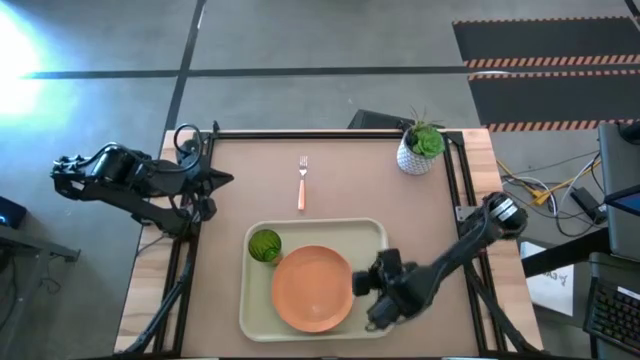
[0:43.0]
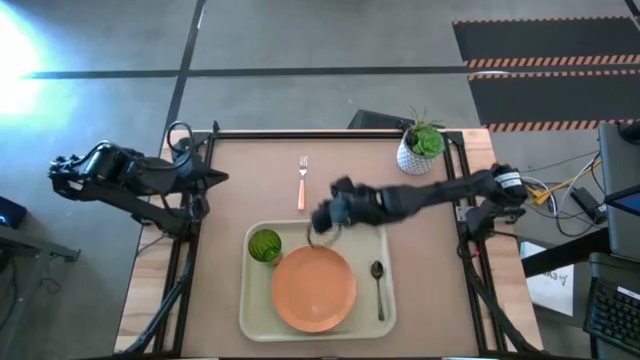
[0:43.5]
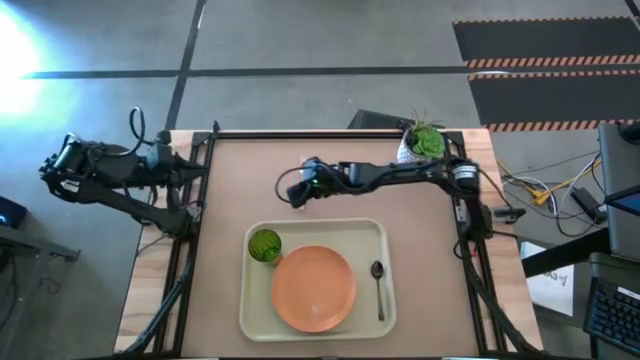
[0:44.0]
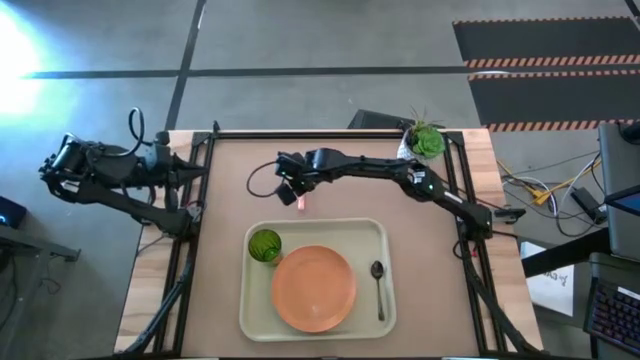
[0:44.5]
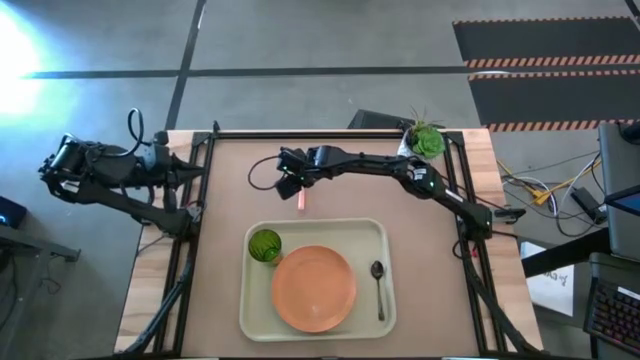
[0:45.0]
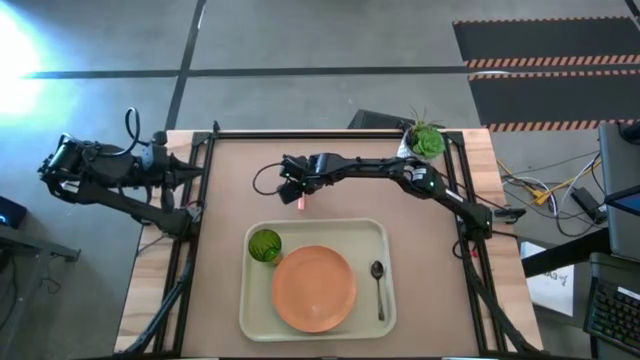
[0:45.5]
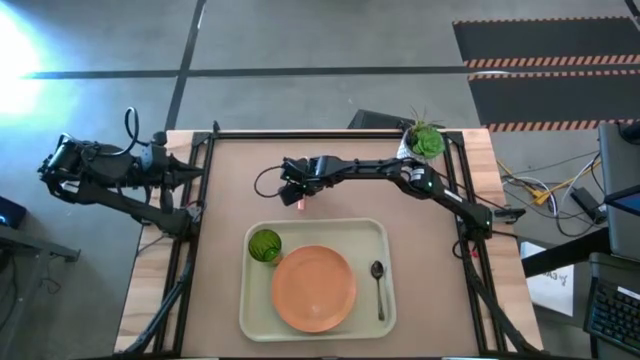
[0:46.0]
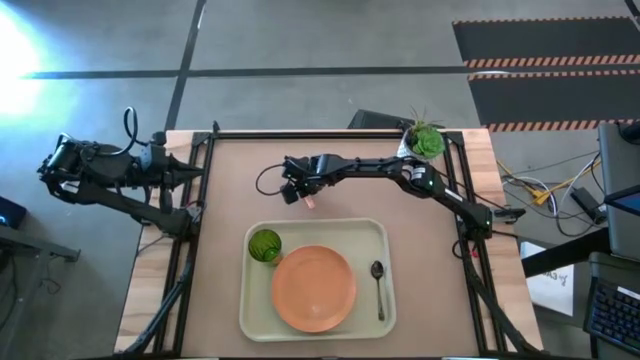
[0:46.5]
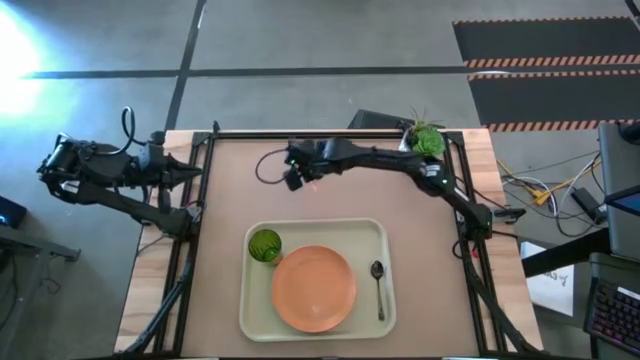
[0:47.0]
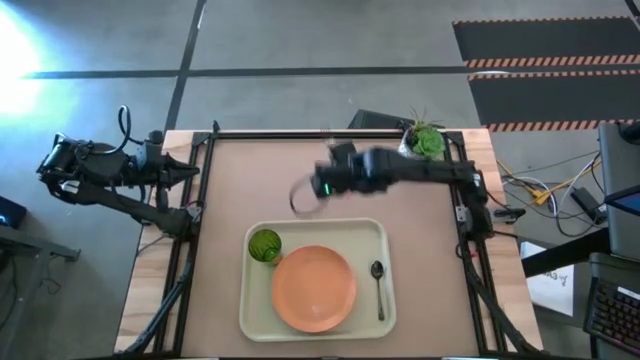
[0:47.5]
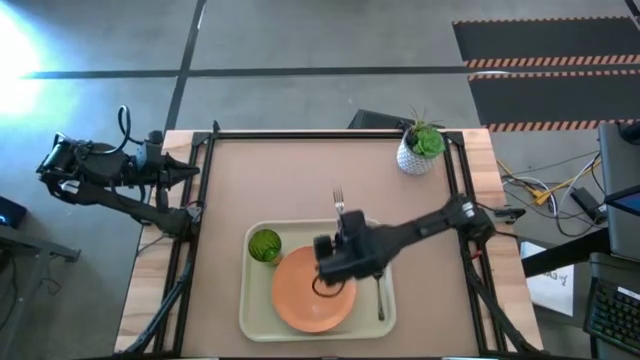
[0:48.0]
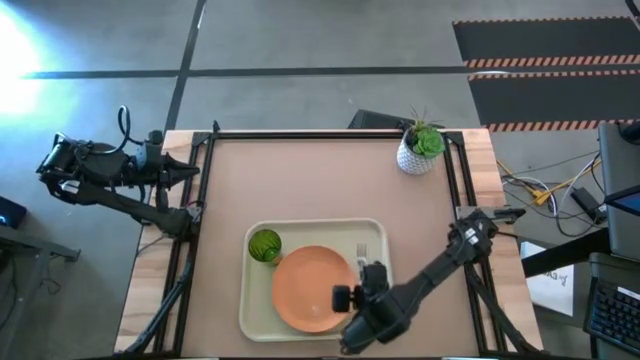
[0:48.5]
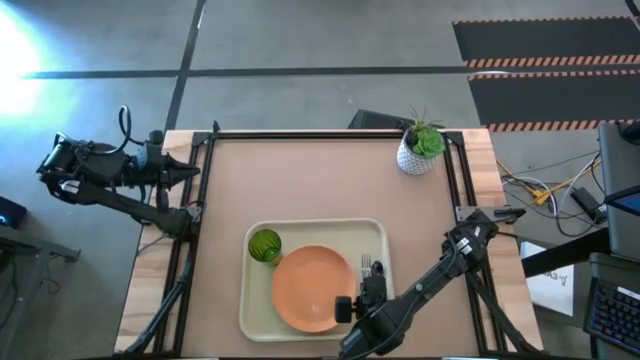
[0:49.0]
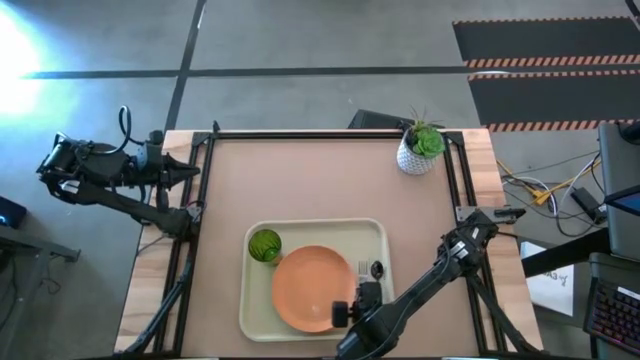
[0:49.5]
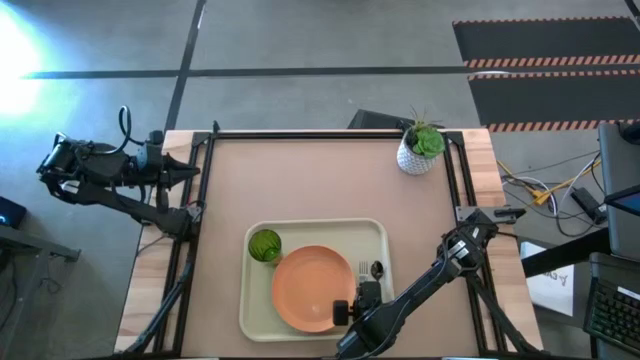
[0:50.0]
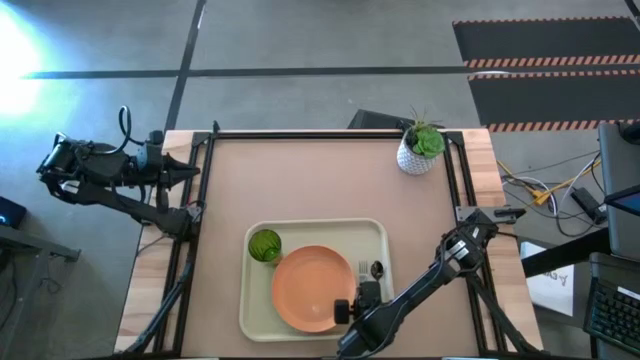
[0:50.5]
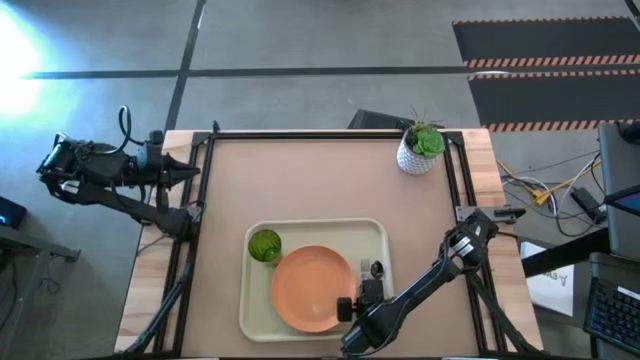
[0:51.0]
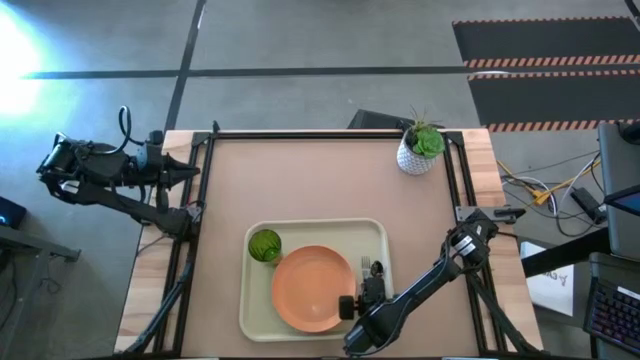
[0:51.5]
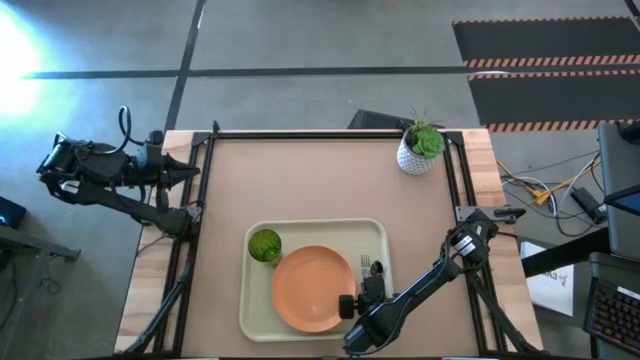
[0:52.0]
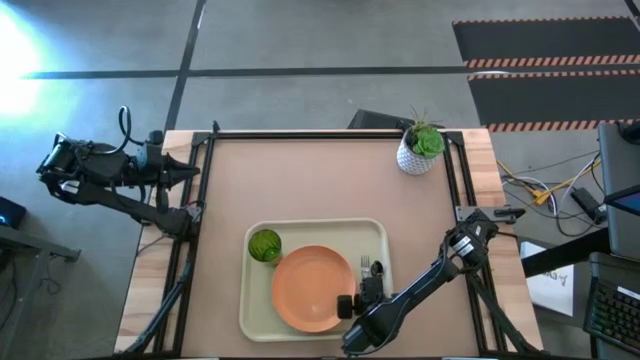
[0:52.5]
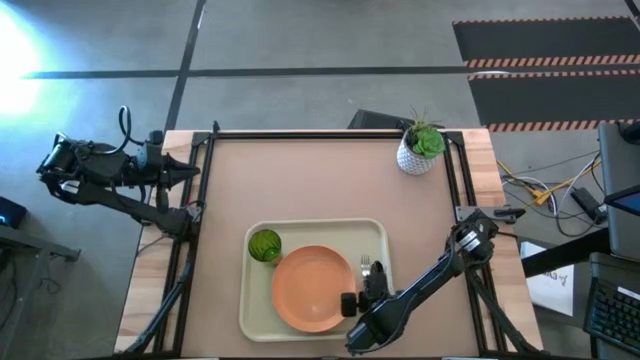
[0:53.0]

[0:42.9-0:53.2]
Task: Pick and place plate/cup/fork/spoon on tray
Put the light orange fork on the left side of the black spoon

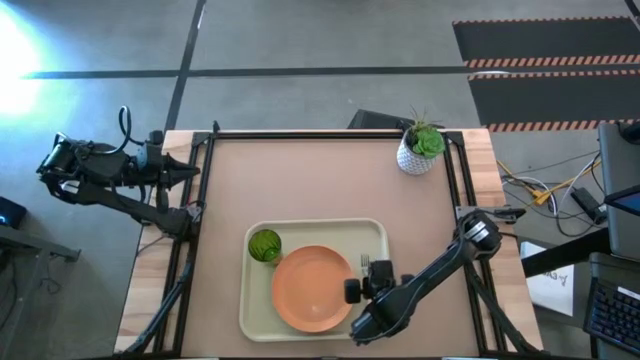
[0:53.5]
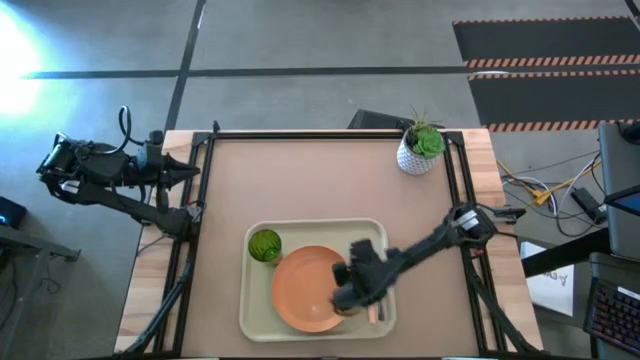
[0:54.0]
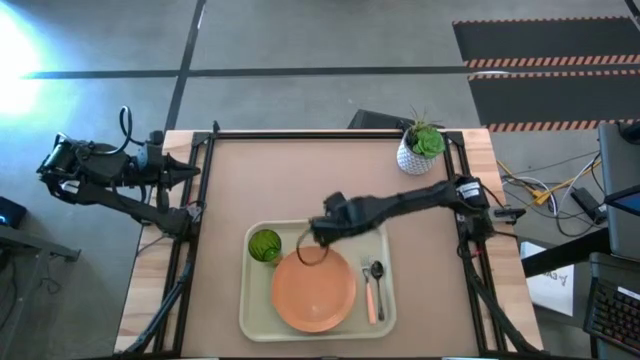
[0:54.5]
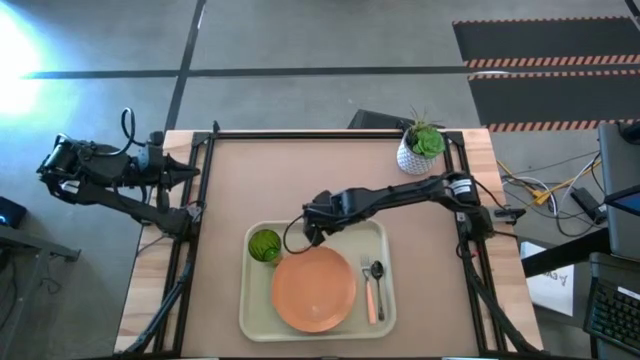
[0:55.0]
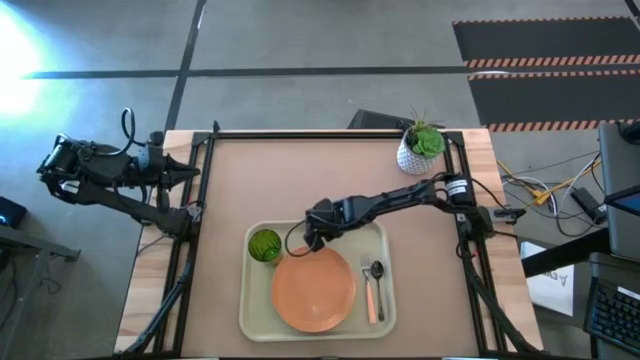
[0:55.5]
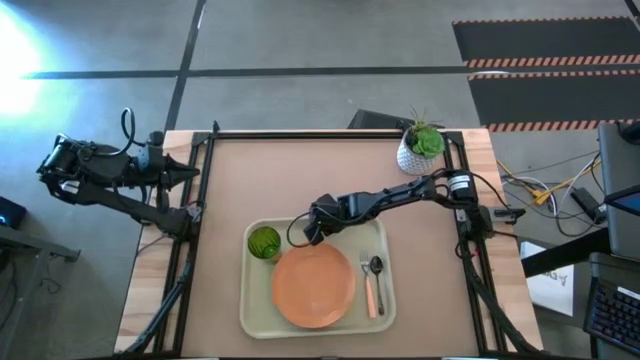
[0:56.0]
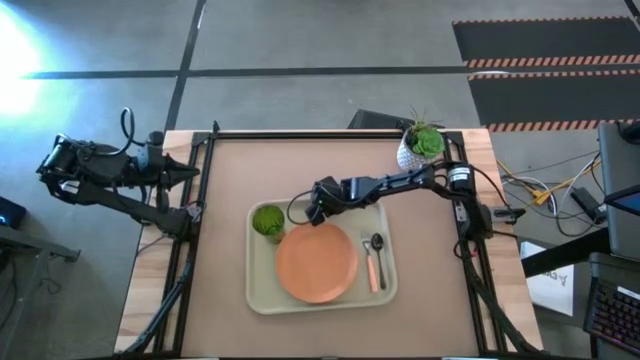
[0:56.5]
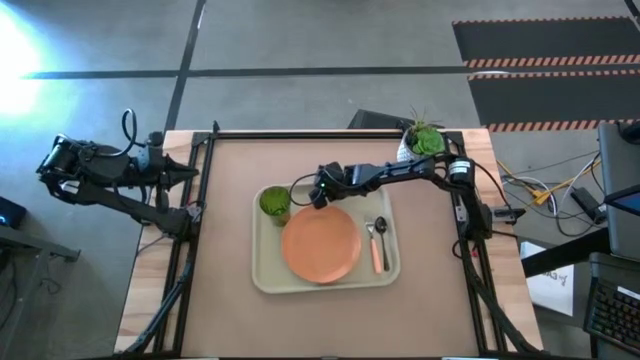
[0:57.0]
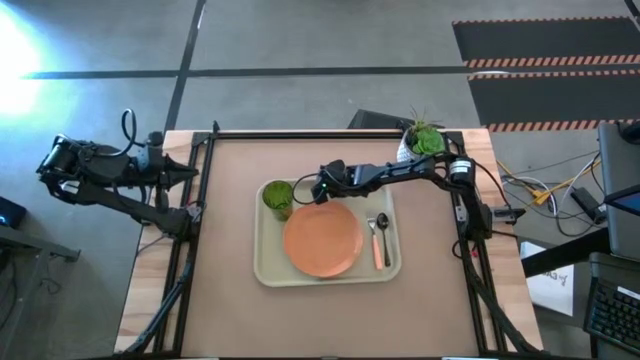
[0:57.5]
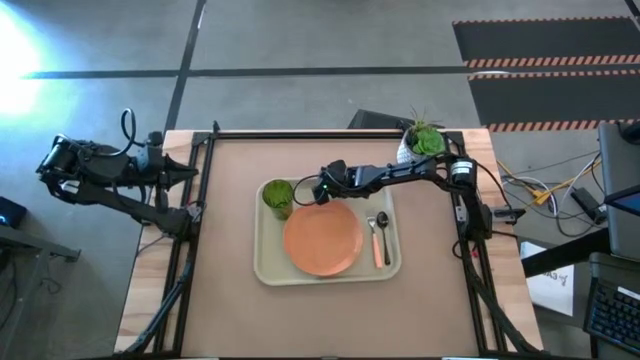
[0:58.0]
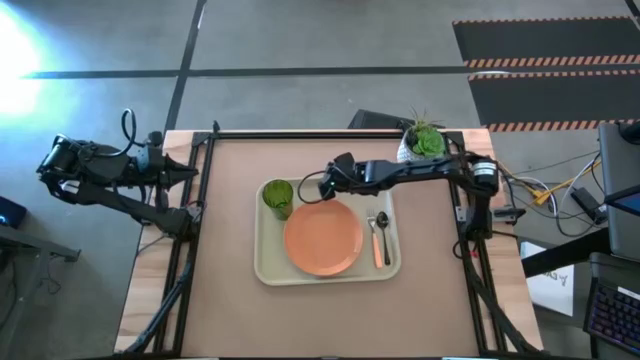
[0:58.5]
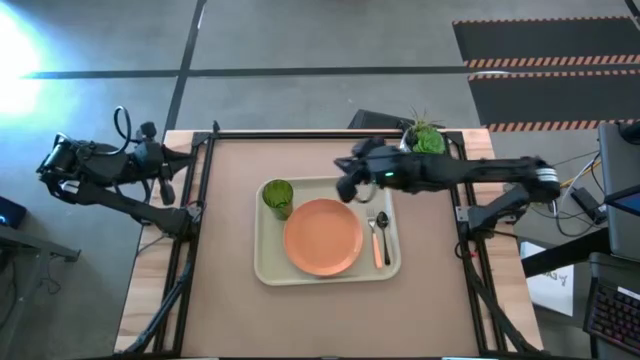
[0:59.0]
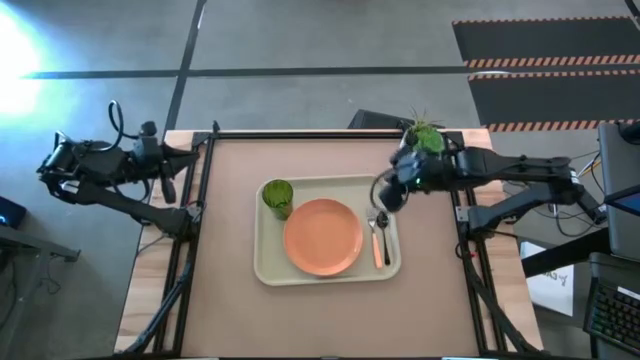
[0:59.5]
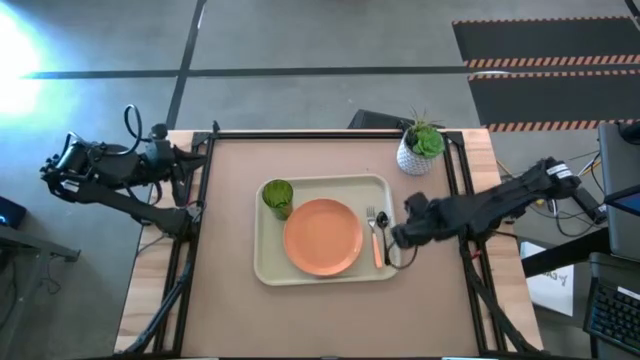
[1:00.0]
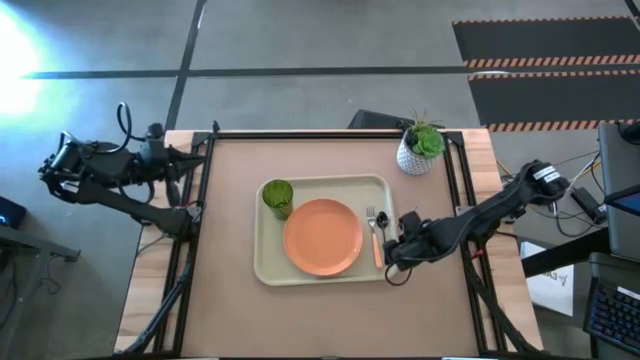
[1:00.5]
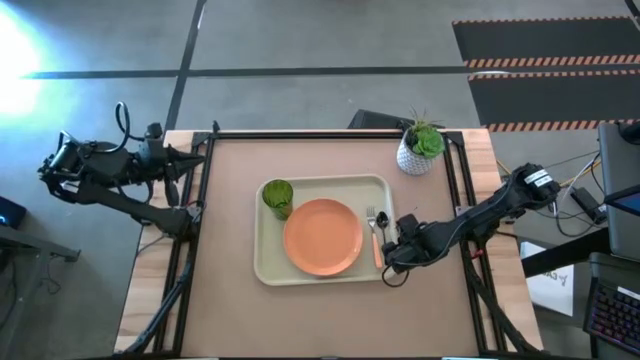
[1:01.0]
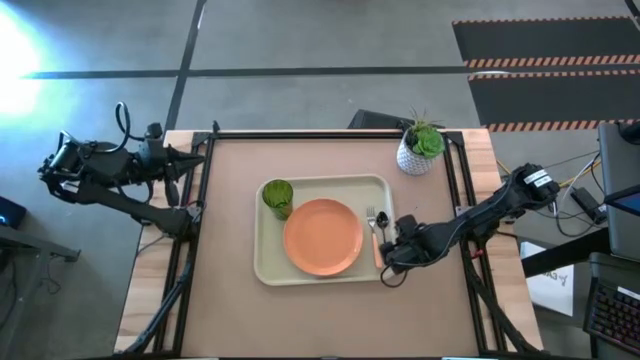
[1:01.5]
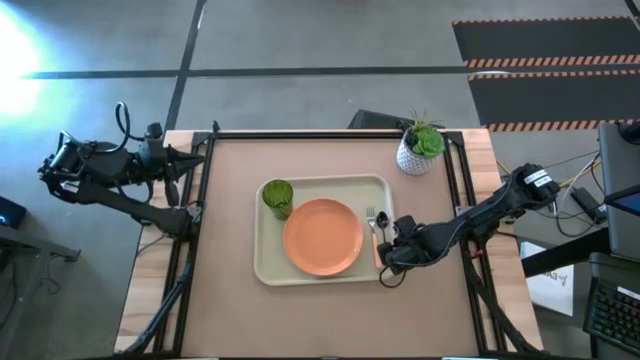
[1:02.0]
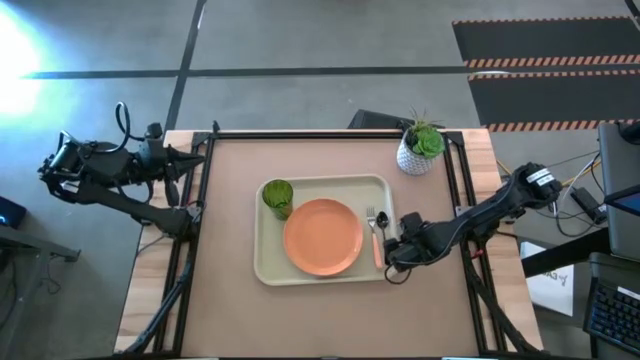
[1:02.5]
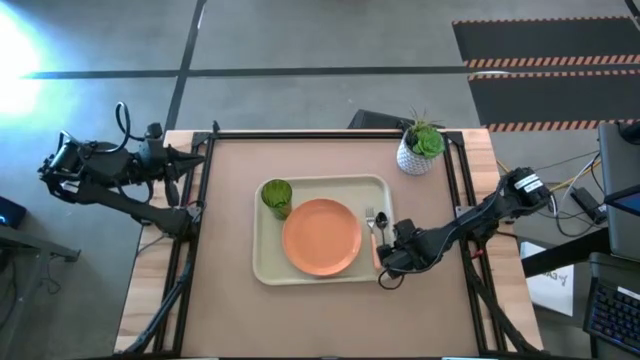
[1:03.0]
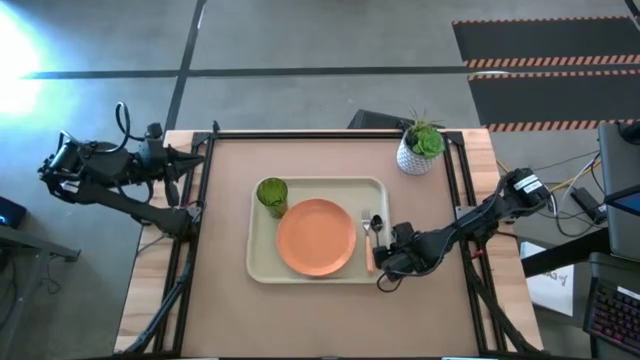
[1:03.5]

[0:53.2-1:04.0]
Adjust the gray tray
